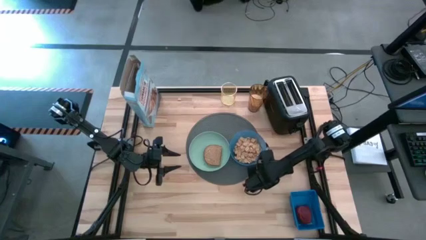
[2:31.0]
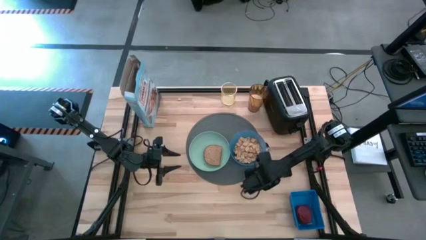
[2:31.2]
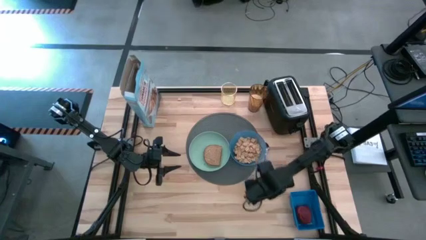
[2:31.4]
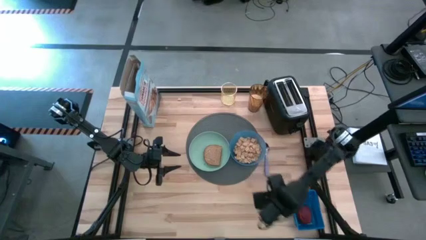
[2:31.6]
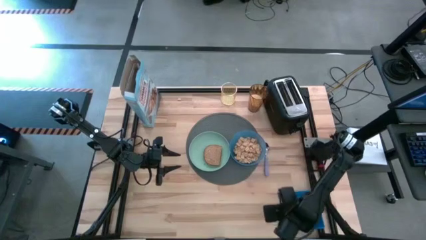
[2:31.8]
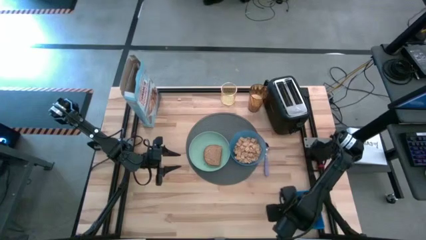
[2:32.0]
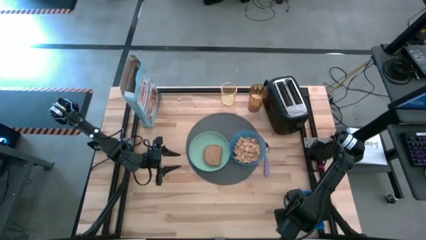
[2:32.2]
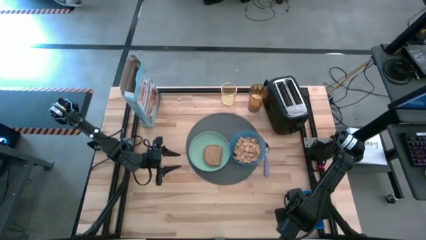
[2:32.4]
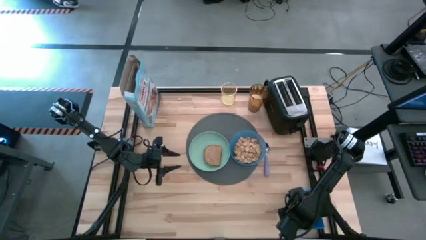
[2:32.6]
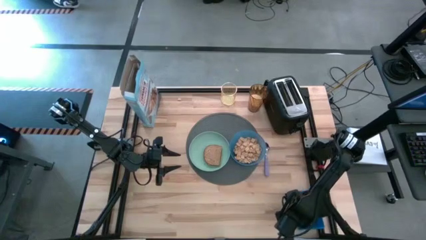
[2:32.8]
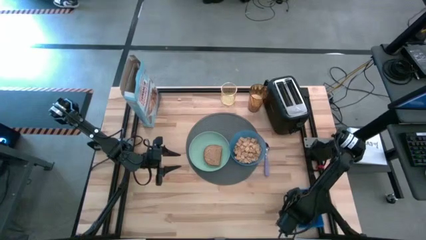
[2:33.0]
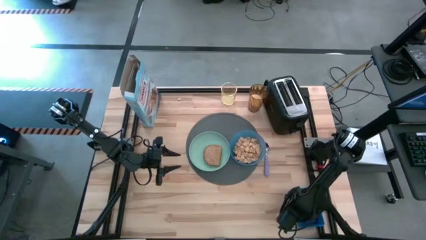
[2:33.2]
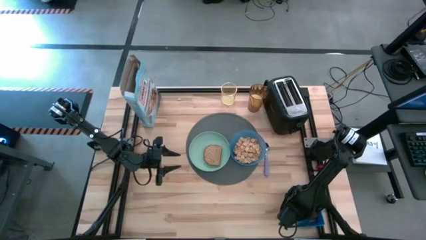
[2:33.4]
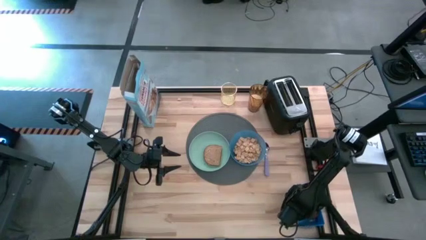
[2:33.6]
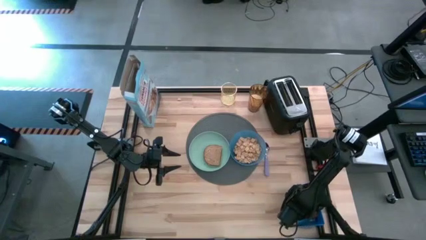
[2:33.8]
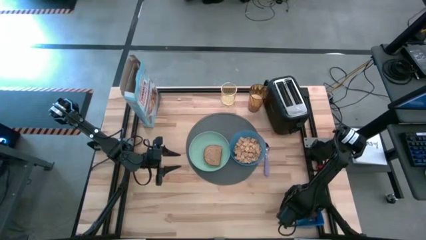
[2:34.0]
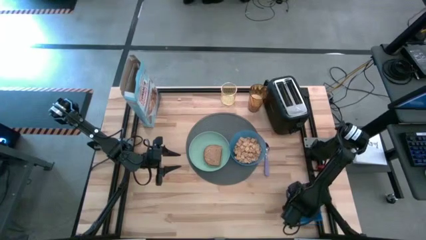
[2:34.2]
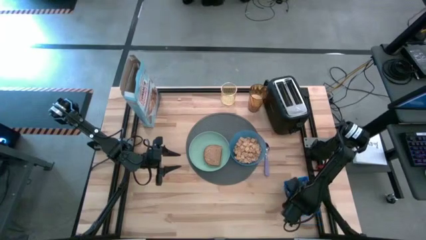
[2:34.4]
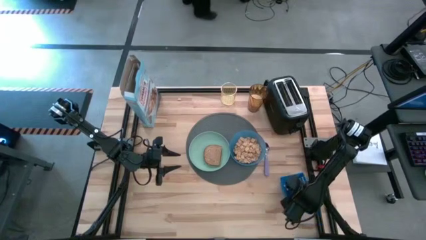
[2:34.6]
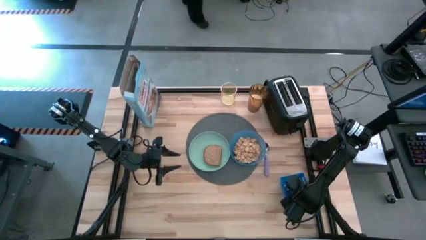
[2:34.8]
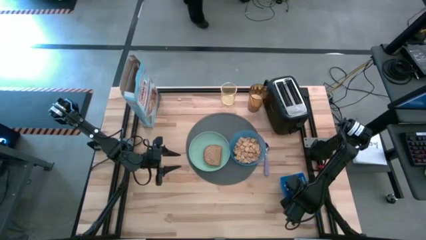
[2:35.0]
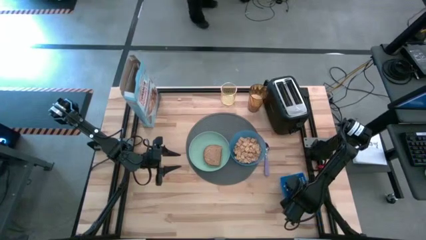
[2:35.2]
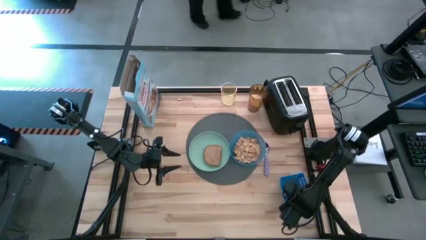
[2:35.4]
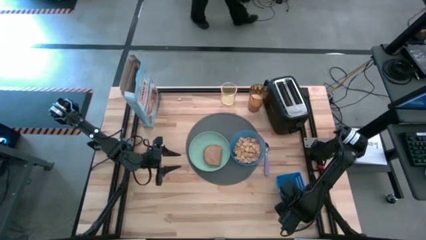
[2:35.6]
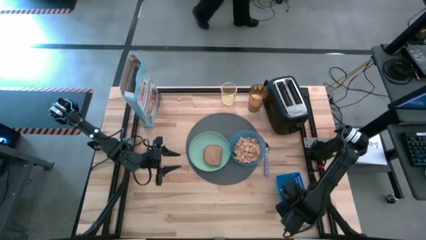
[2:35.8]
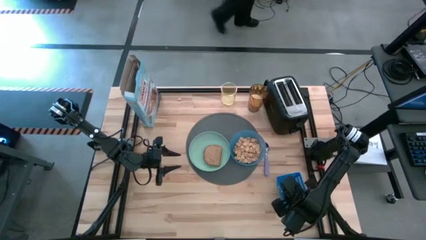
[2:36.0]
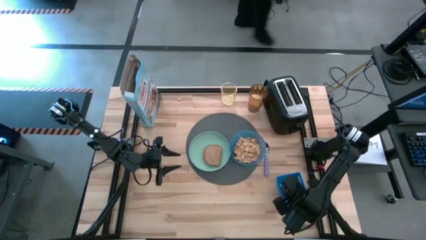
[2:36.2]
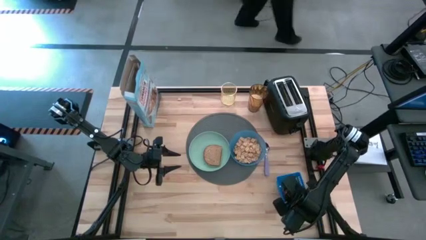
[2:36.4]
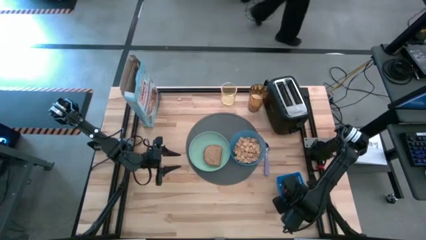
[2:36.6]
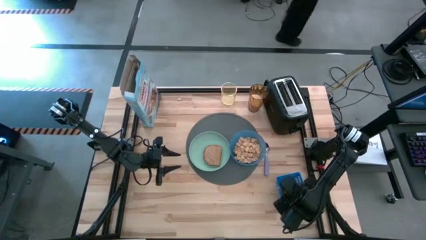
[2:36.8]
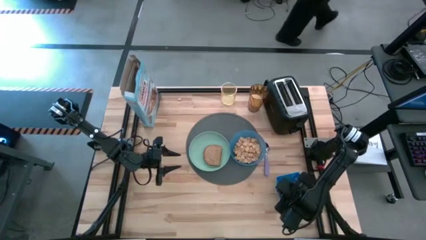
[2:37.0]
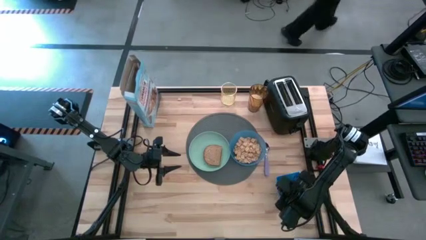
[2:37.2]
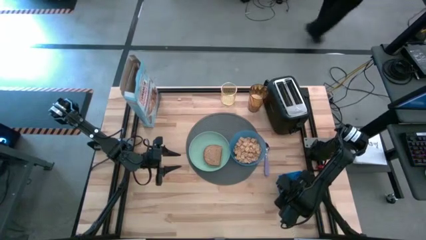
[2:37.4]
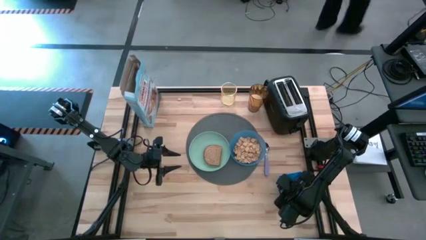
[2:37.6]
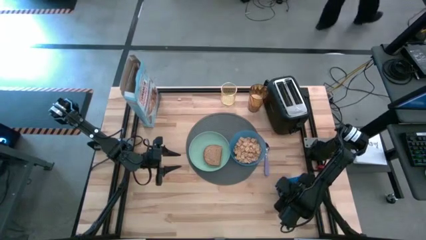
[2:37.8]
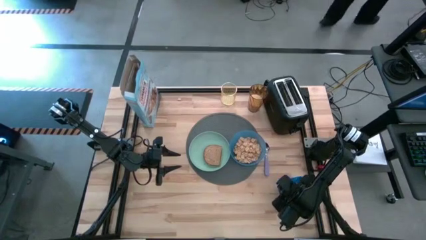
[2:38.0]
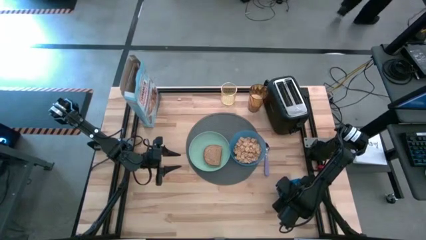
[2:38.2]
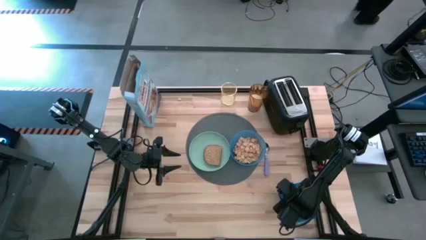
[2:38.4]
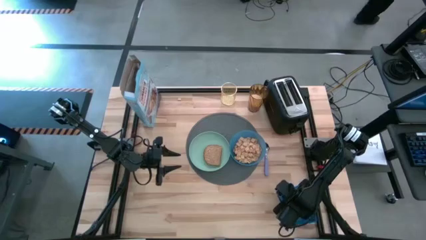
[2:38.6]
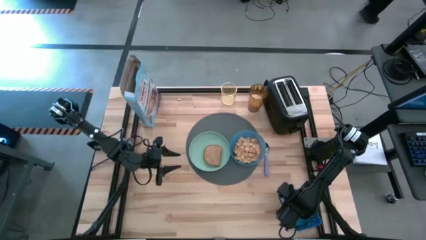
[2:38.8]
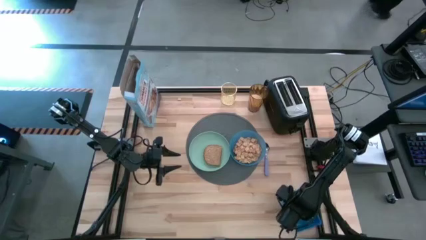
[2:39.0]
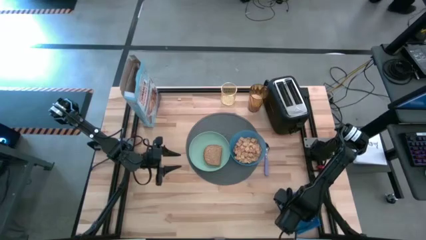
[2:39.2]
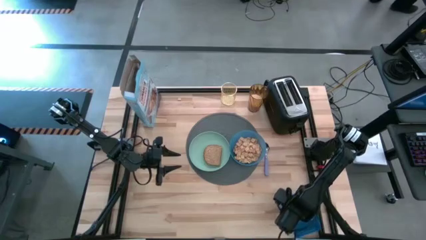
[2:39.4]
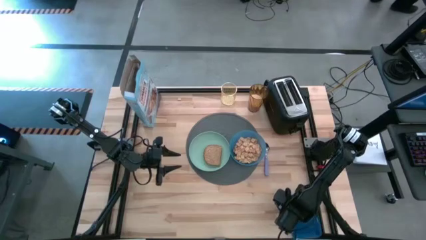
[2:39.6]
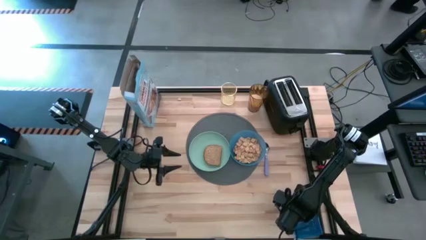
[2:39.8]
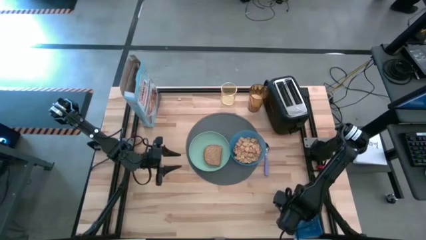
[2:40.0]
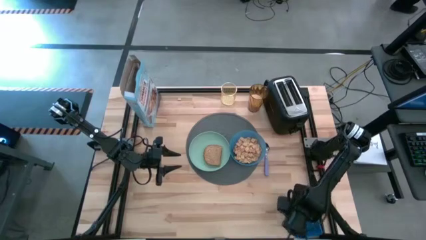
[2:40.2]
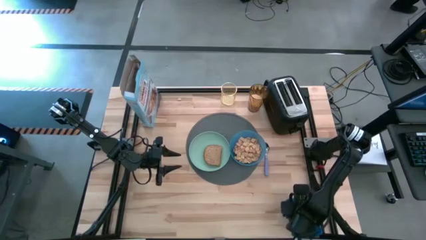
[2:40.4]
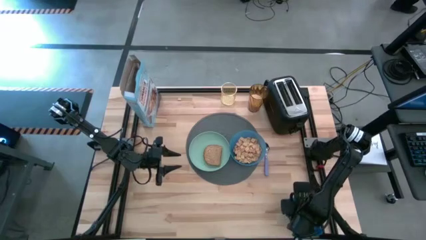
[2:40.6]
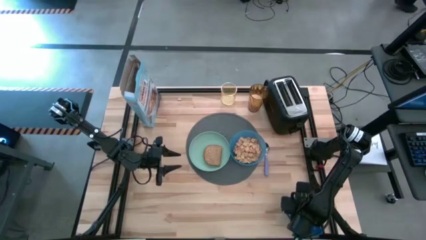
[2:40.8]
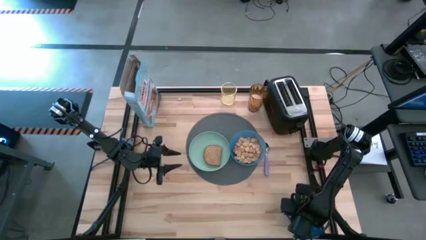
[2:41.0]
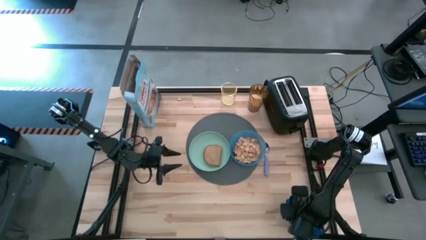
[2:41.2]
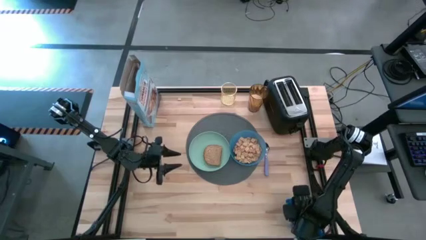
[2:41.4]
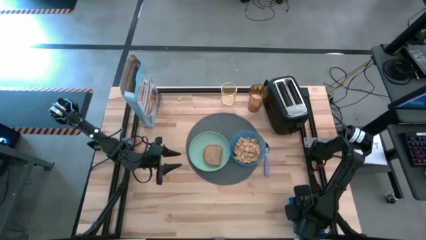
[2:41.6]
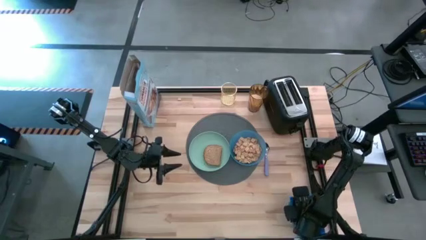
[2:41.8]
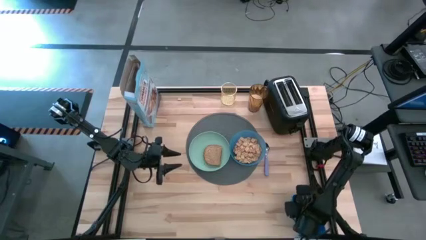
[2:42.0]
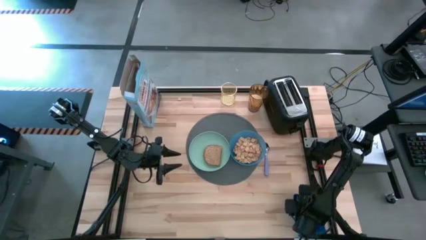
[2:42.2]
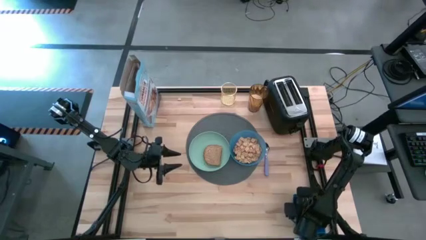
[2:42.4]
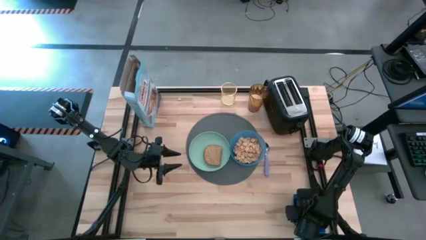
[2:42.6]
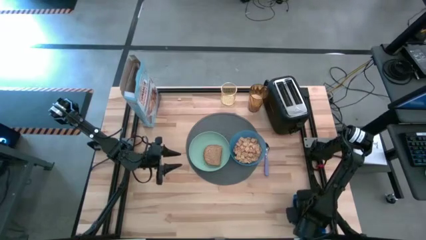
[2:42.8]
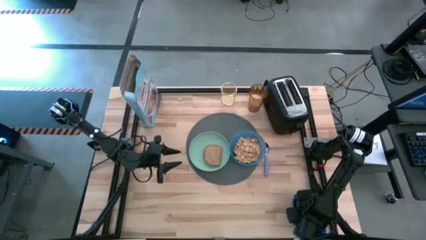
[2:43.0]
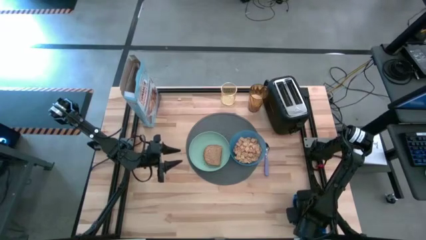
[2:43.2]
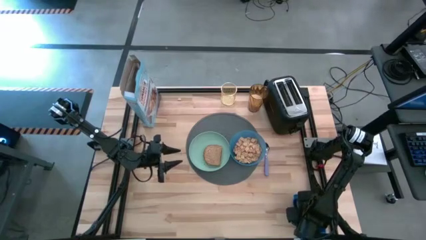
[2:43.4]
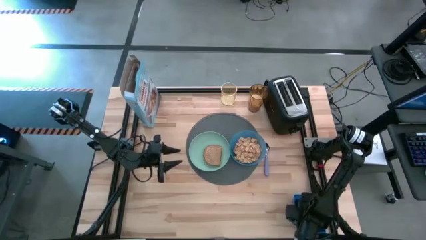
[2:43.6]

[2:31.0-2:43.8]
Task: Arrange a breakfast setting
Put the apple on the green plate

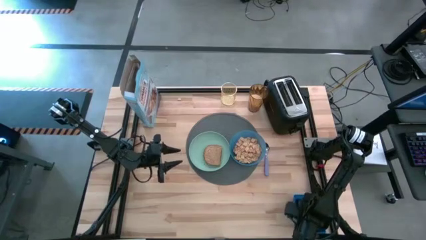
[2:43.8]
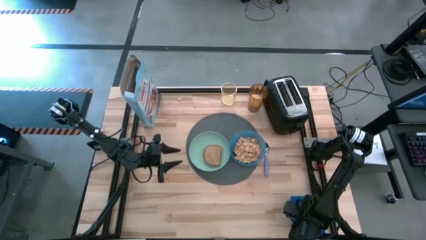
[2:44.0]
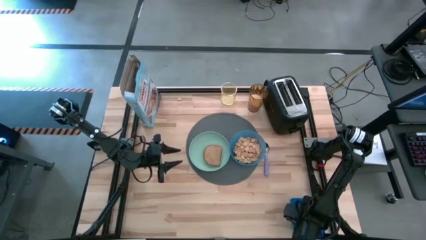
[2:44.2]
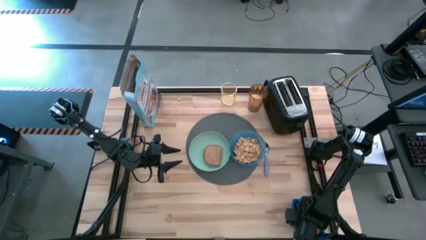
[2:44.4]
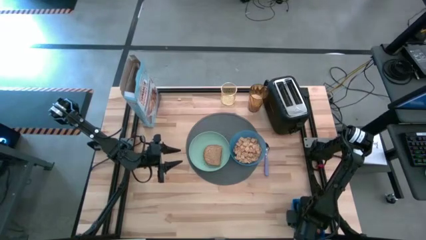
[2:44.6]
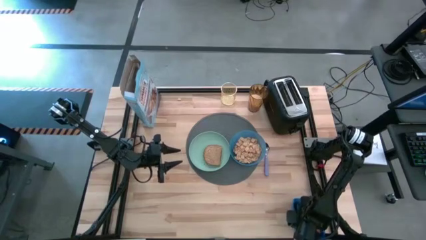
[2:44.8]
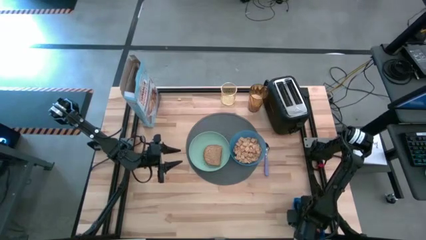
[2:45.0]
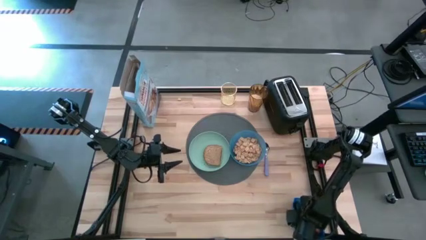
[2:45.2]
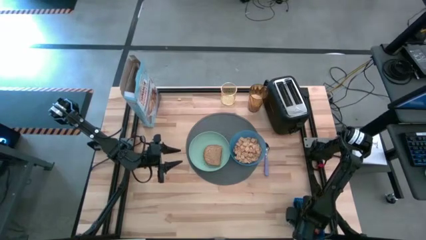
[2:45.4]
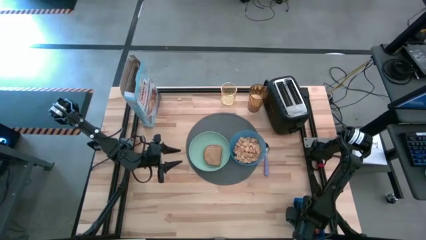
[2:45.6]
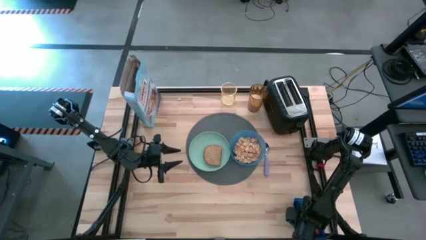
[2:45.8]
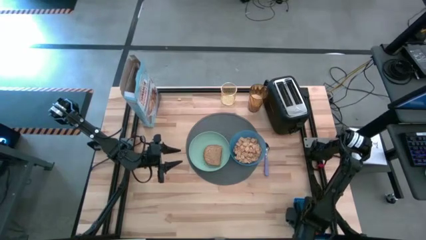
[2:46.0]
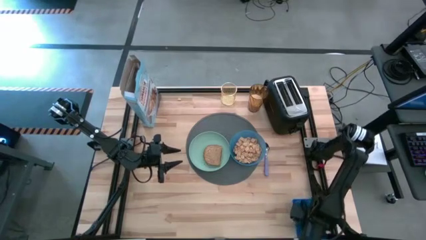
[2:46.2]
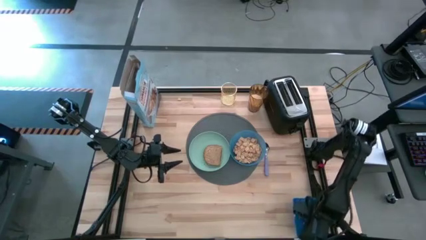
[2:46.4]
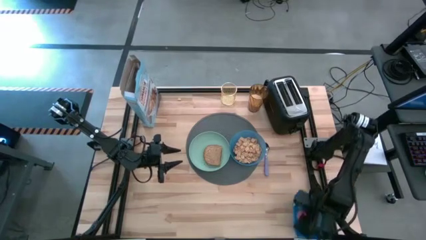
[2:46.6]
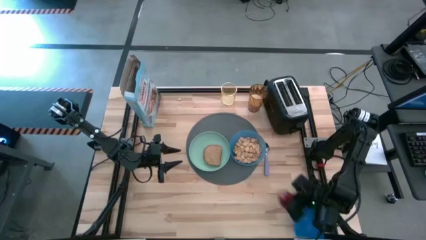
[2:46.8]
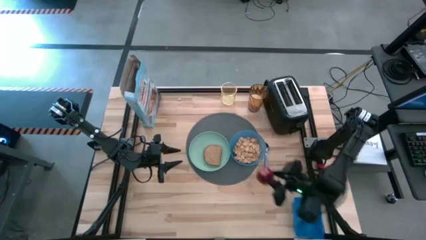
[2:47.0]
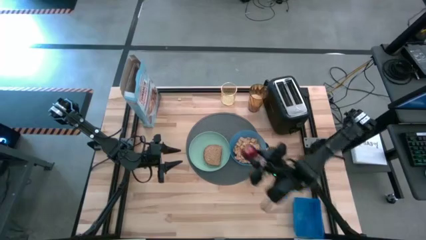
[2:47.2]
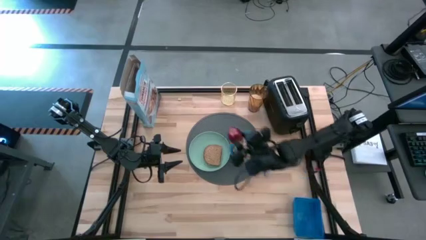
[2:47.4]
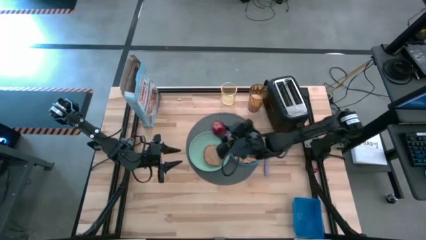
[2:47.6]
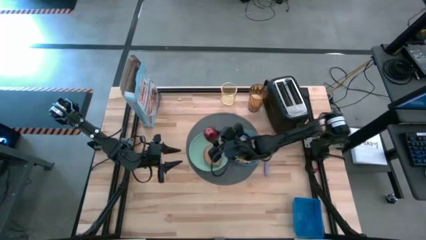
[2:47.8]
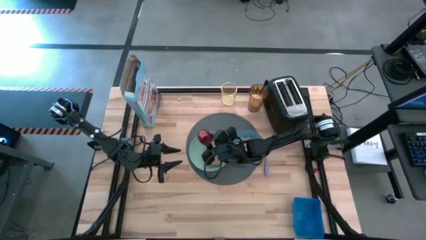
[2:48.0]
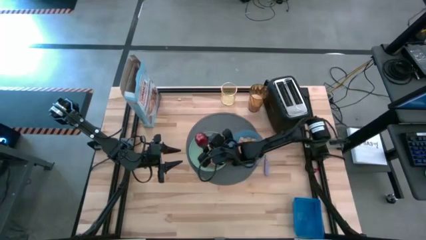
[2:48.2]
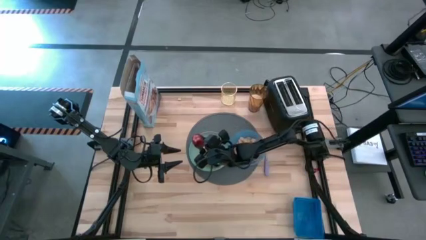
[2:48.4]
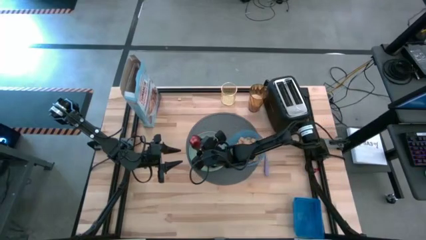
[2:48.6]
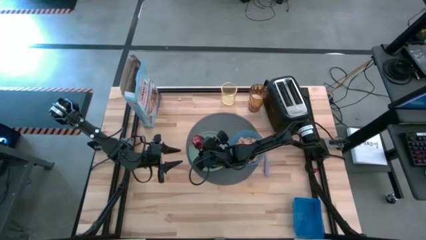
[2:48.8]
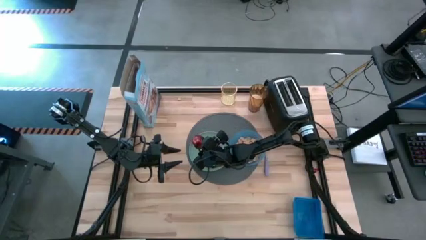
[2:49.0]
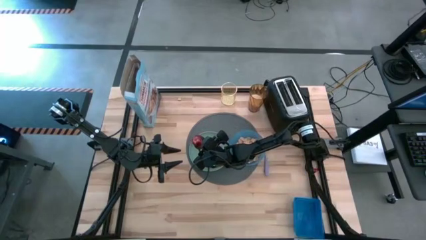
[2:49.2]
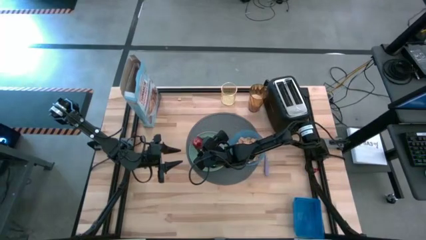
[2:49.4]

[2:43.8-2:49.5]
Put the dark red apple into the green plate
